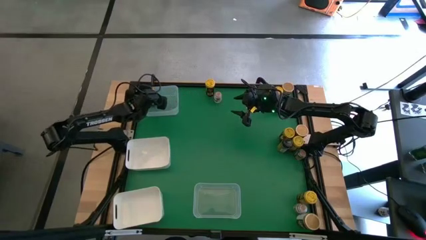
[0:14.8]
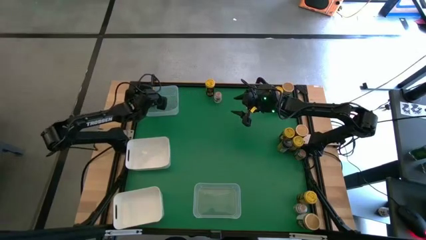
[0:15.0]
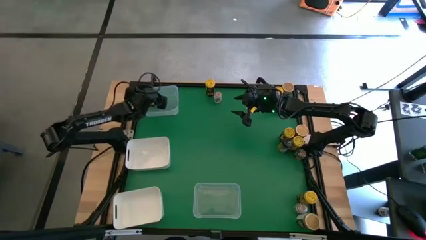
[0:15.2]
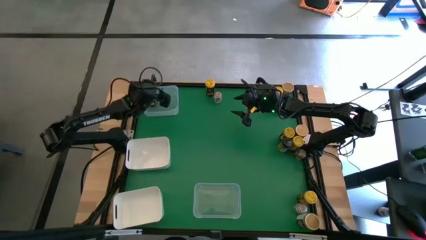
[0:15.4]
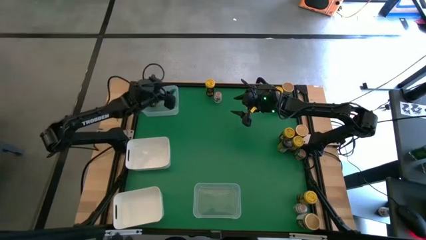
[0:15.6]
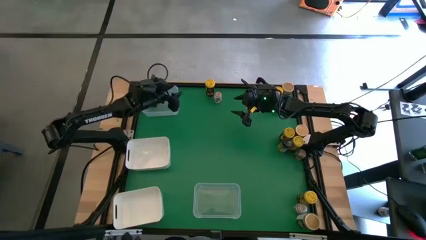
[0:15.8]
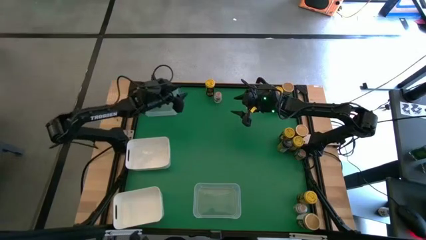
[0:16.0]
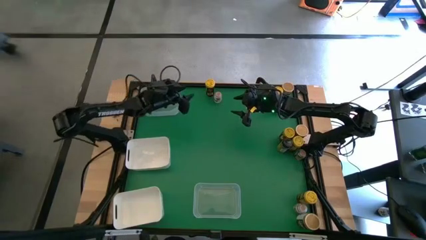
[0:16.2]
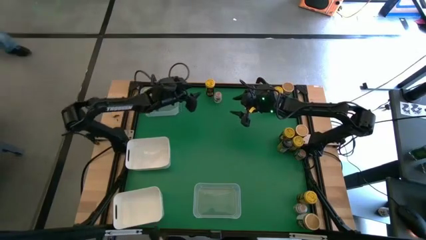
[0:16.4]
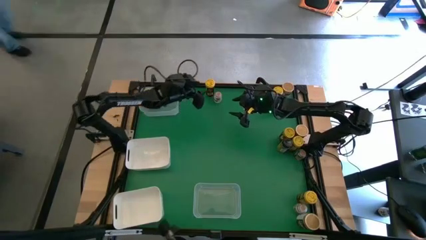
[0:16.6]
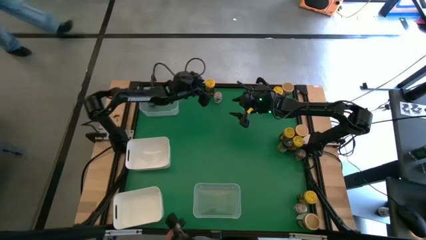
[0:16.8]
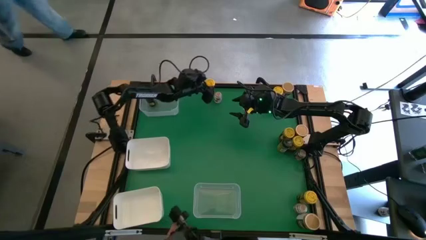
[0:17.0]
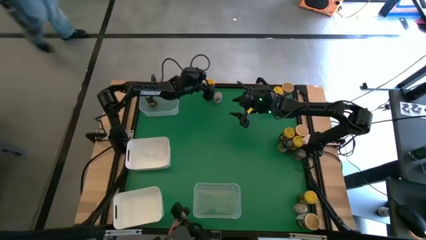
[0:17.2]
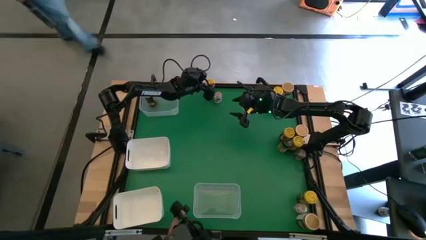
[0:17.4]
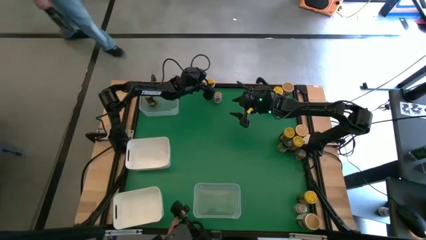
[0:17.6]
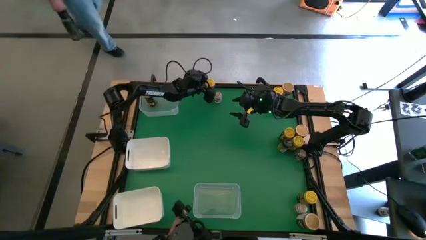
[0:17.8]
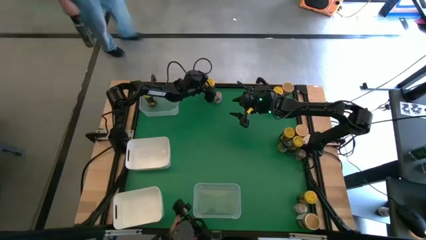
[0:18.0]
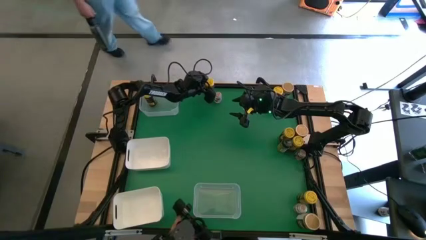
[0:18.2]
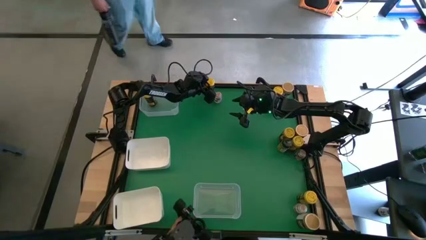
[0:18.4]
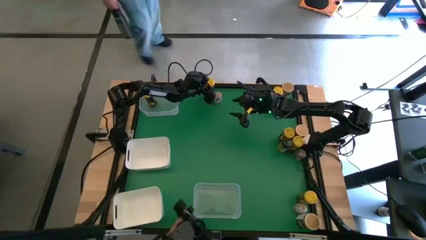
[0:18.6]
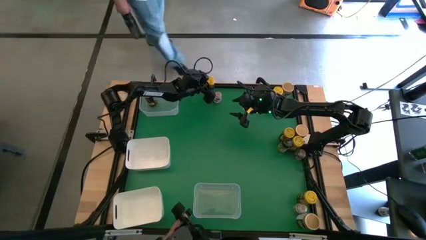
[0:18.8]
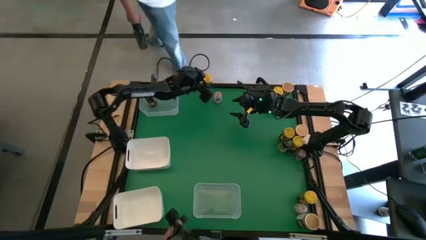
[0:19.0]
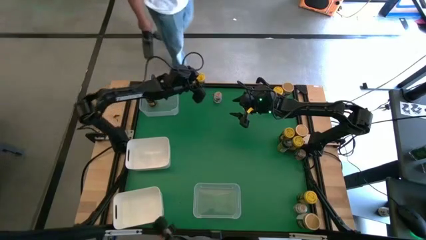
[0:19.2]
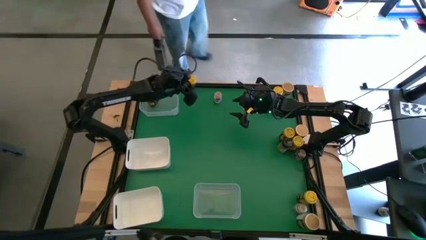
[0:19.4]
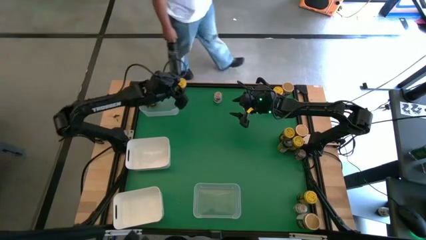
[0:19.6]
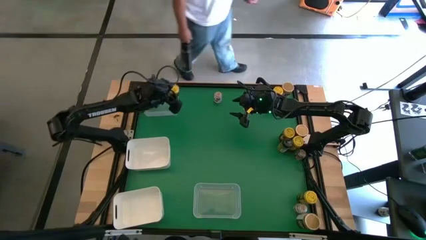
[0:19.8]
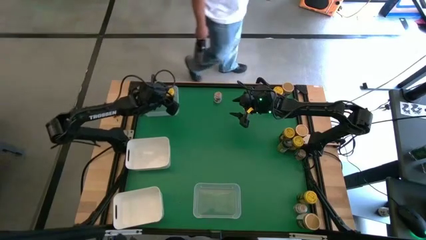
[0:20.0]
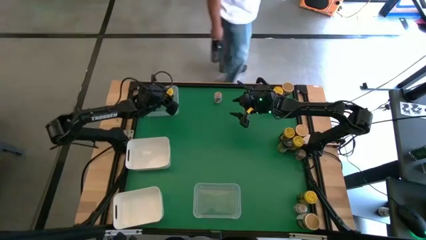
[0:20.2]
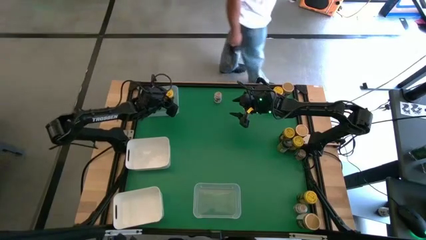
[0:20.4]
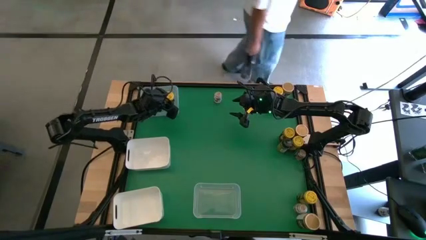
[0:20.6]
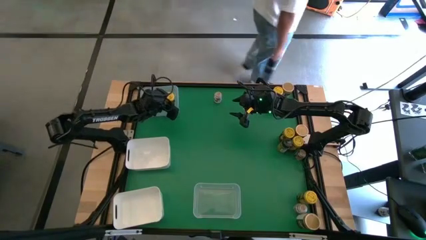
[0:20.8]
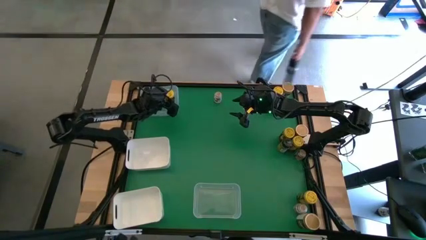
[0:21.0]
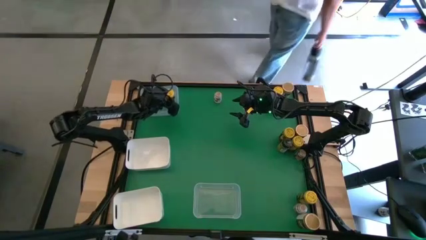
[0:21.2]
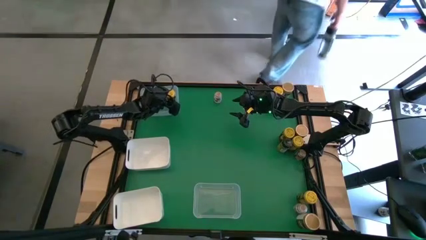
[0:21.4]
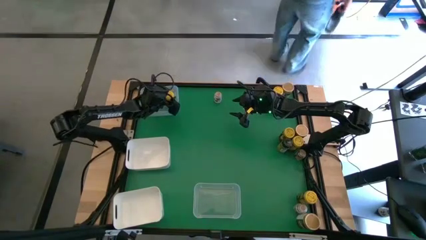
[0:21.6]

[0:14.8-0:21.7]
Task: Sort spices by type
Put the yellow spice bottle into the top transparent bin

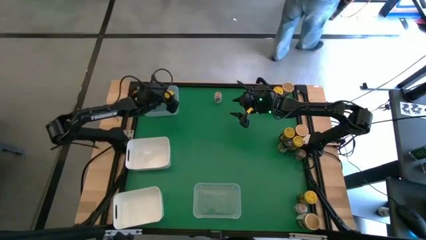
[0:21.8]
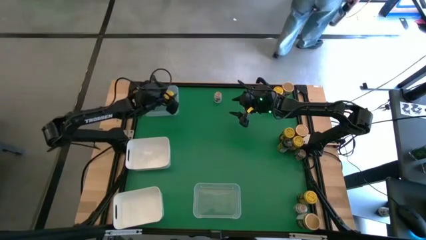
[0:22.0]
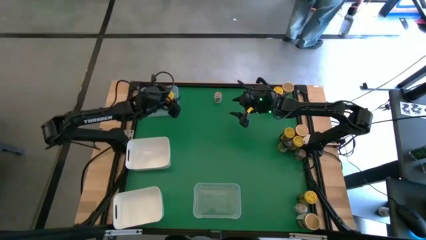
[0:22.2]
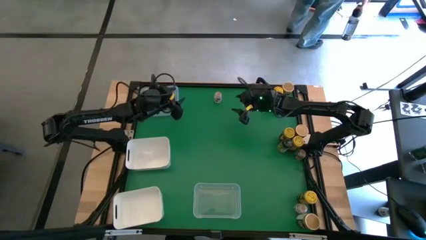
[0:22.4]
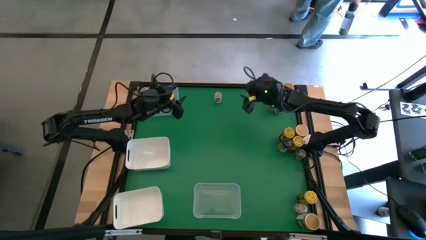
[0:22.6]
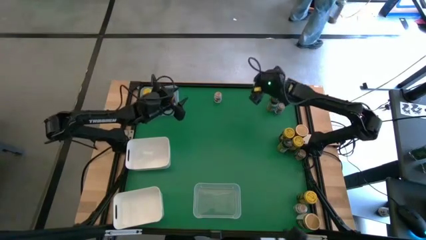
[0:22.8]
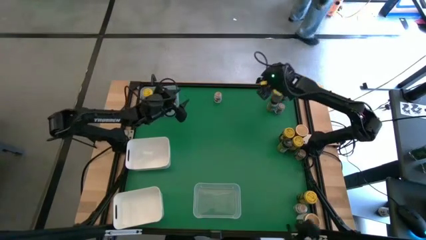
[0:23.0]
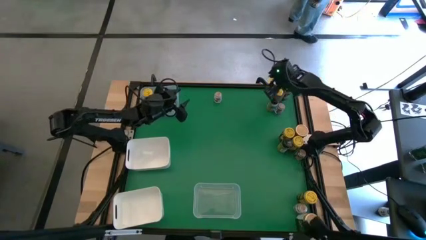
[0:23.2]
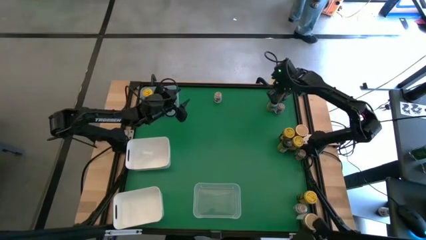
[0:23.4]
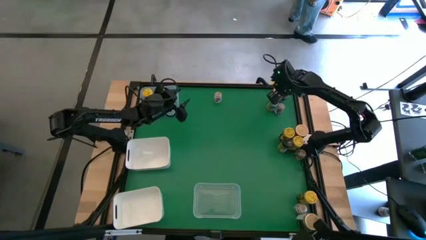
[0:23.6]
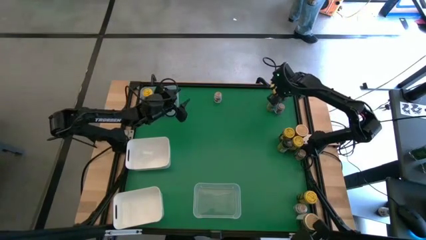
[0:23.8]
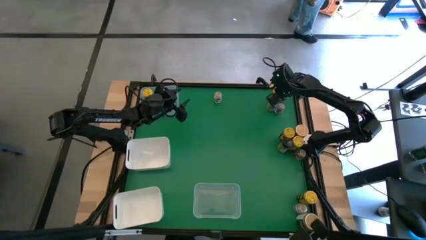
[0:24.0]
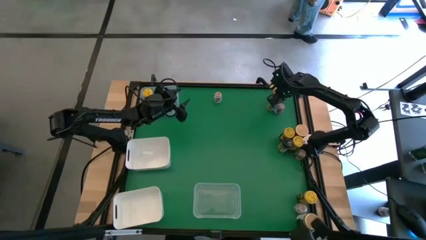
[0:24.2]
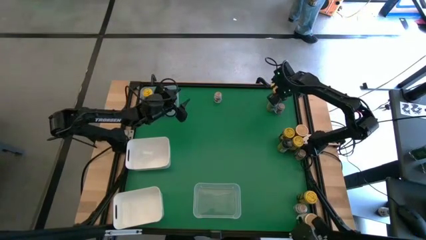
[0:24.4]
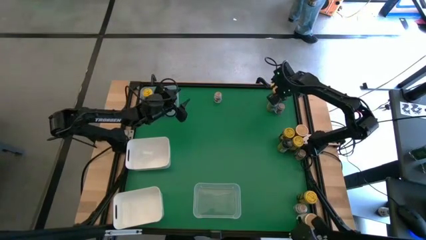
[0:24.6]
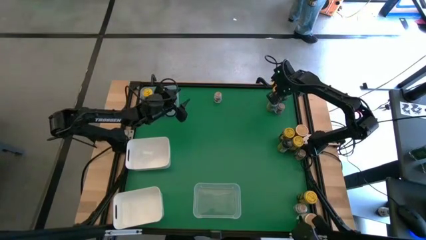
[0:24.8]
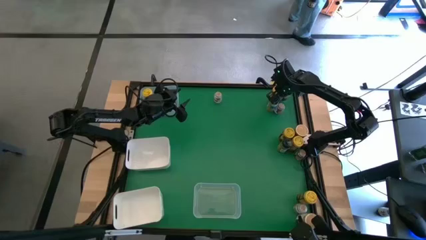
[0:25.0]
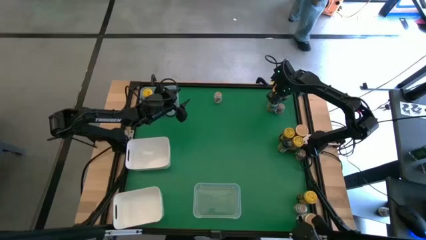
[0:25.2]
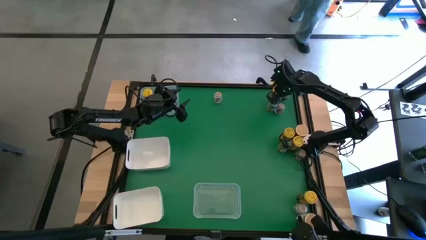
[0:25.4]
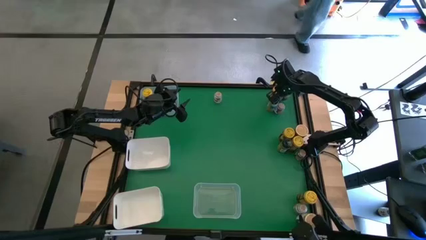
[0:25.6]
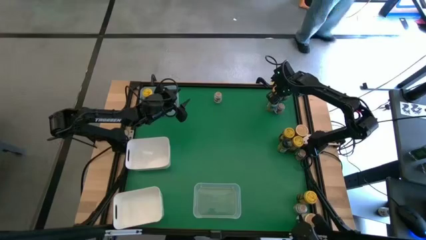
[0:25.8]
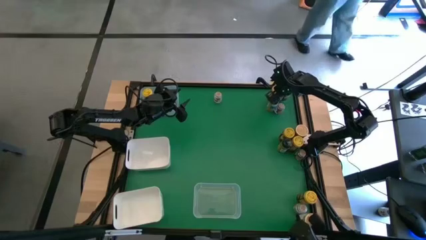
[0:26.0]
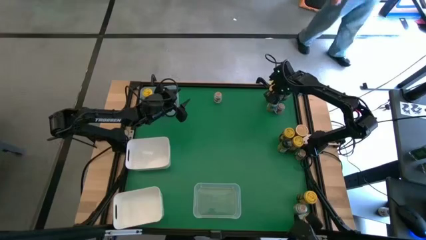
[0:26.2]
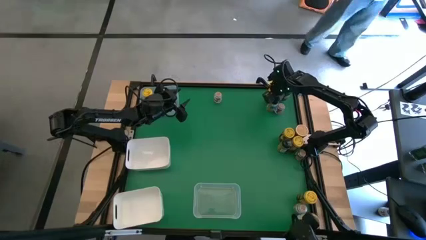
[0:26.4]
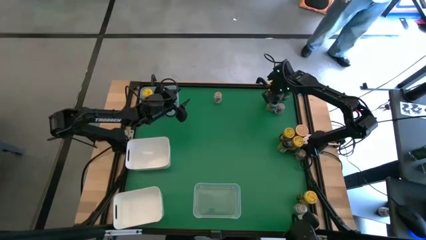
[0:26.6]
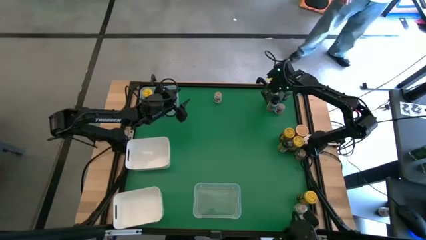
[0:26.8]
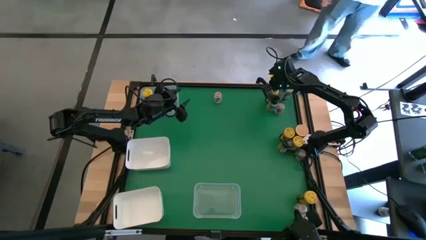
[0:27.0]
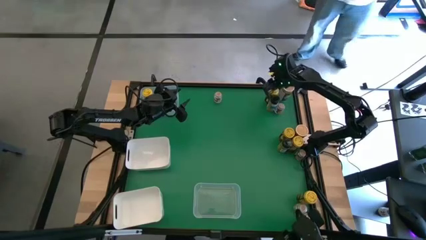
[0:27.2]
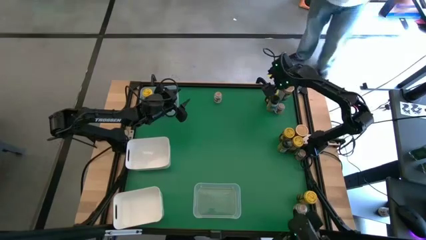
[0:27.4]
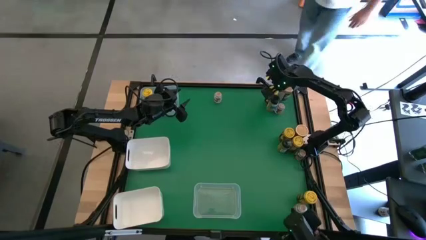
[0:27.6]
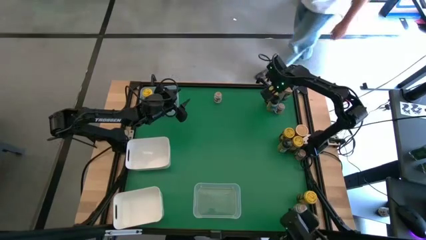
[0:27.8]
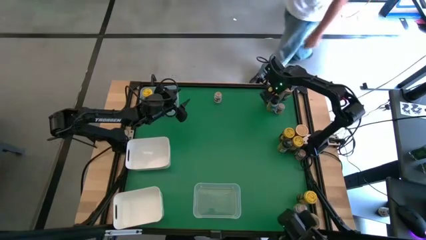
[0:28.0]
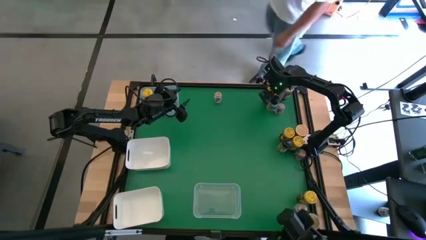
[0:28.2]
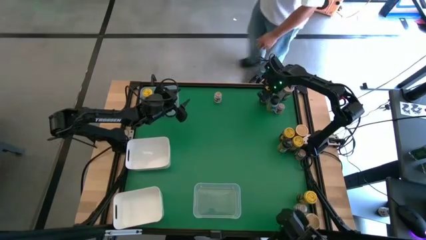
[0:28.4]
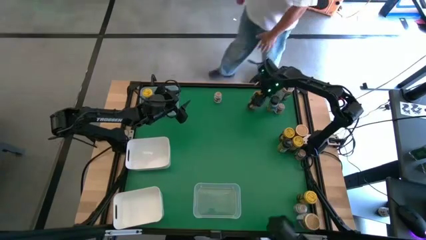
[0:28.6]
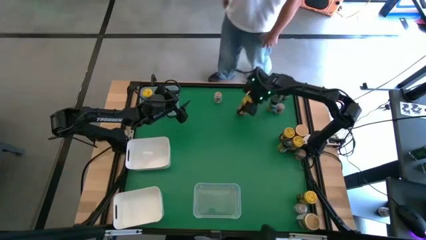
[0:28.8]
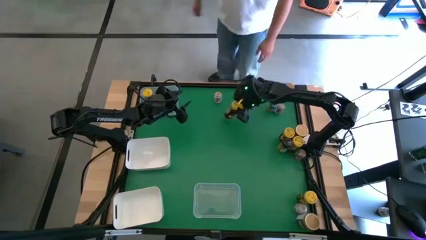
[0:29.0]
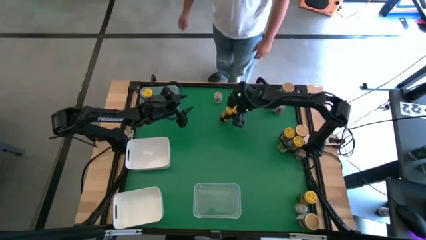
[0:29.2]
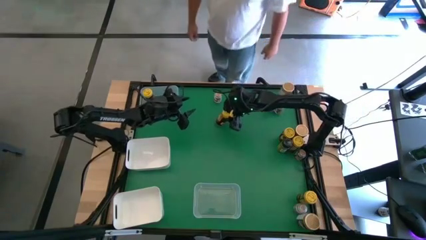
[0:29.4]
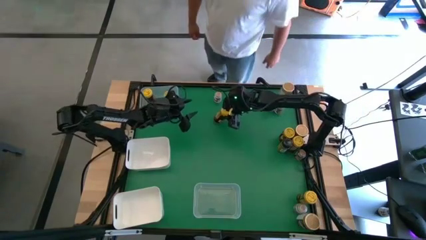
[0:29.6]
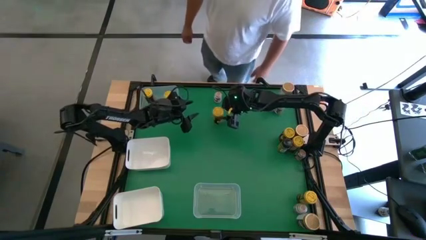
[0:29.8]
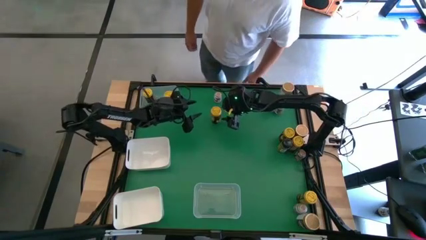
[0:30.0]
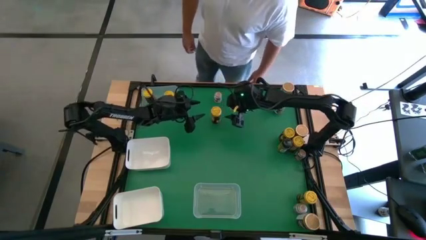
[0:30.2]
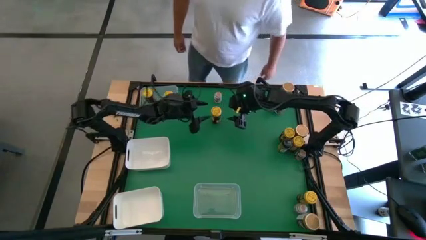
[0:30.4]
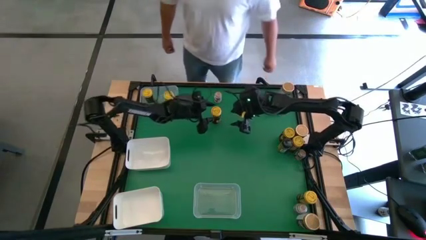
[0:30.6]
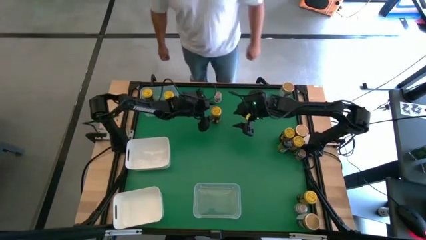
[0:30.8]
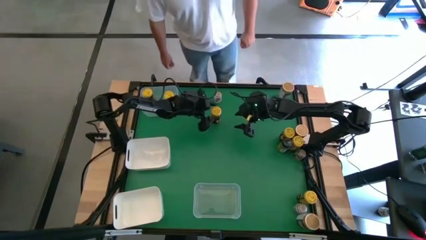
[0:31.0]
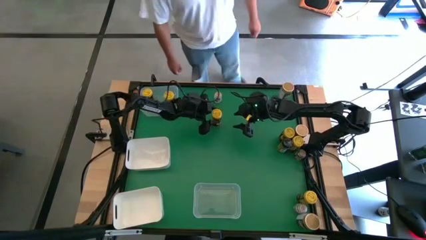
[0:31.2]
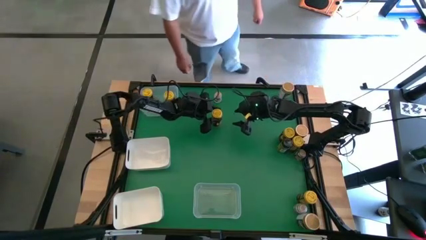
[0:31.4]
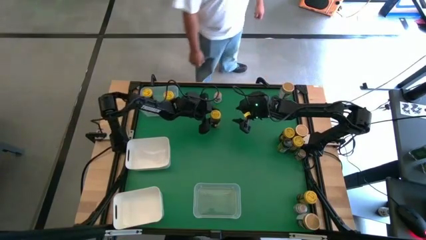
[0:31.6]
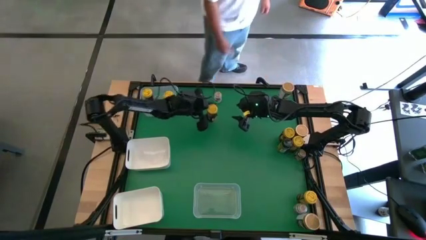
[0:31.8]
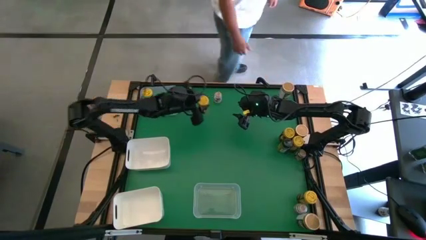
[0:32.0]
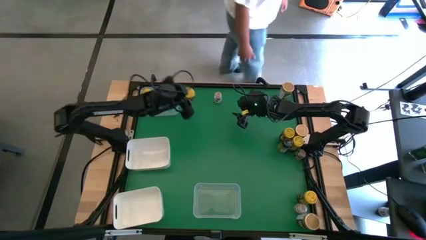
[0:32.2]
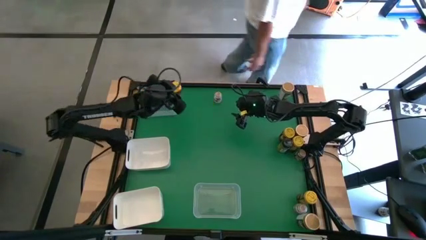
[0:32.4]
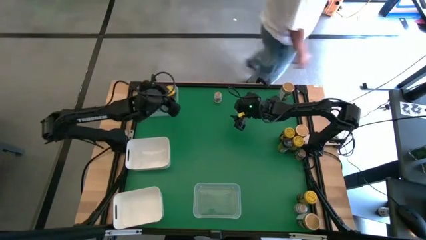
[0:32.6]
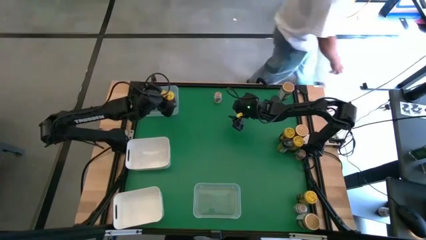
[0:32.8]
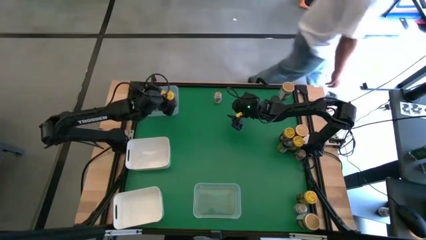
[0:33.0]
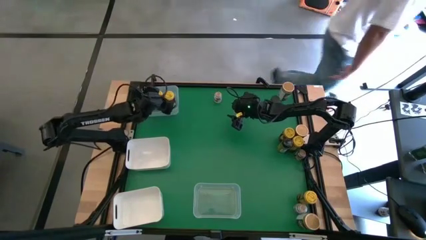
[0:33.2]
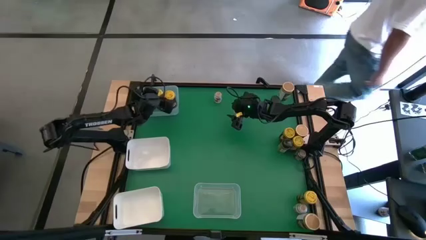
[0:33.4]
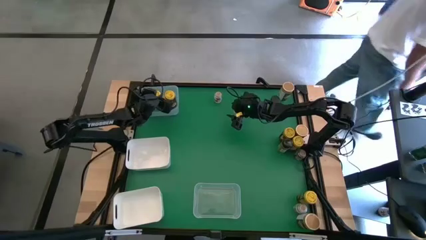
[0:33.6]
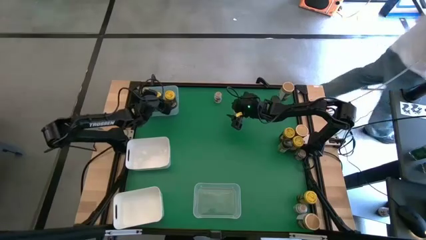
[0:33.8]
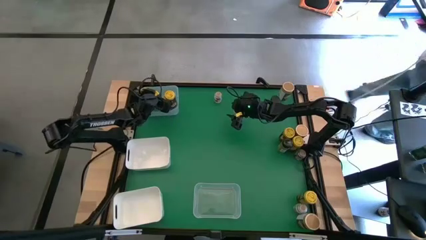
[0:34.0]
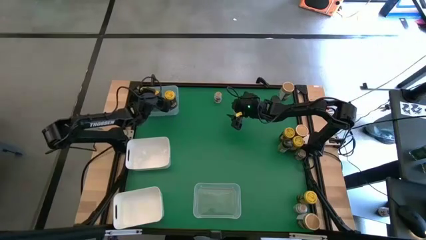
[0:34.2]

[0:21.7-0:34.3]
Put the yellow spice bottle into the top transparent bin
